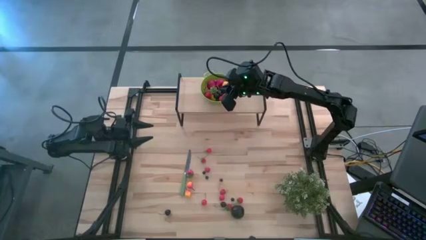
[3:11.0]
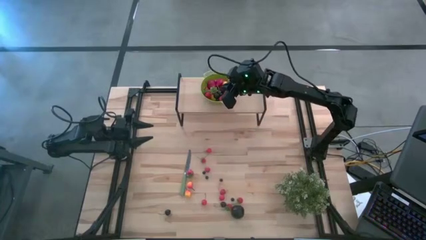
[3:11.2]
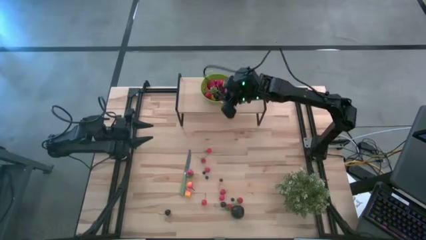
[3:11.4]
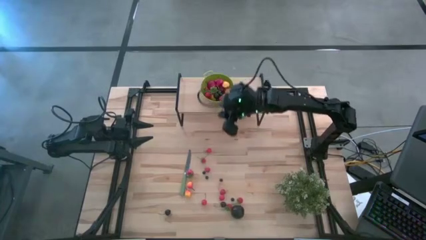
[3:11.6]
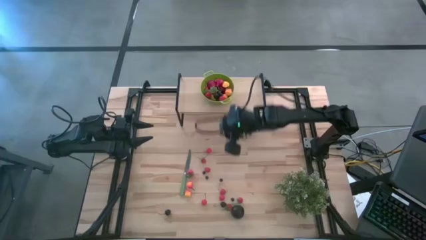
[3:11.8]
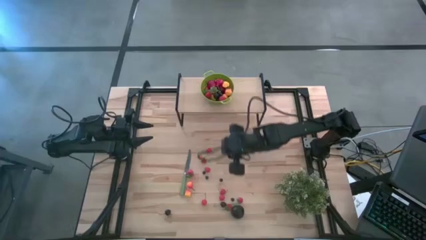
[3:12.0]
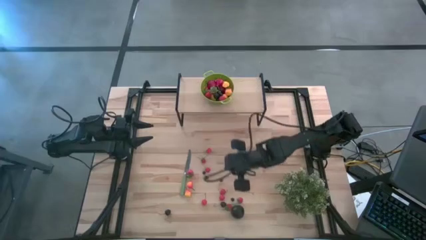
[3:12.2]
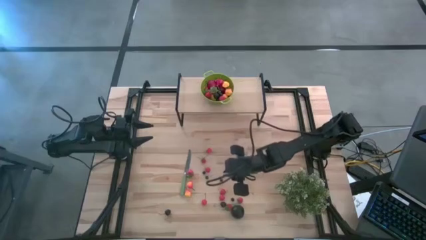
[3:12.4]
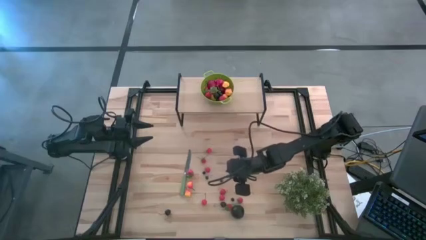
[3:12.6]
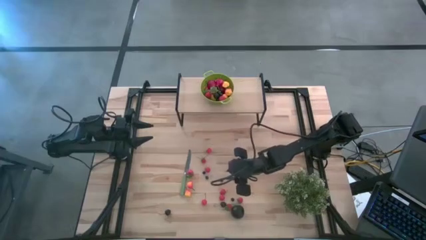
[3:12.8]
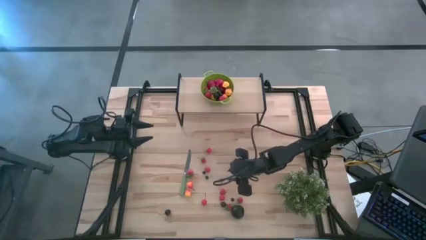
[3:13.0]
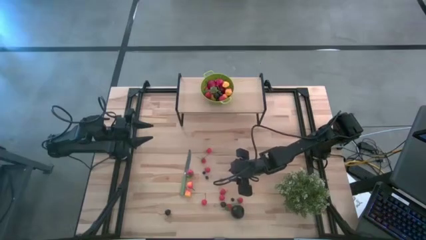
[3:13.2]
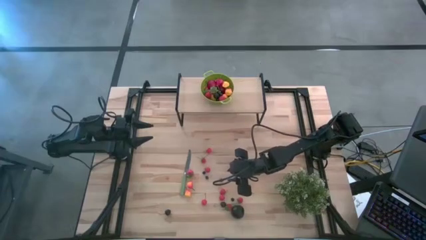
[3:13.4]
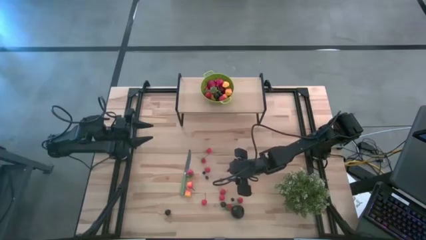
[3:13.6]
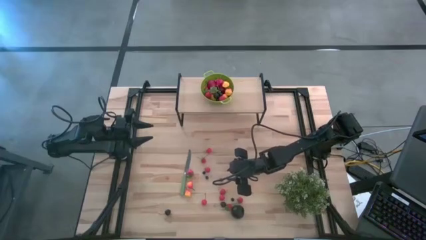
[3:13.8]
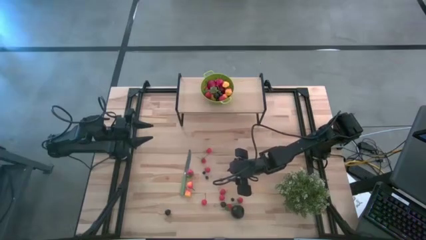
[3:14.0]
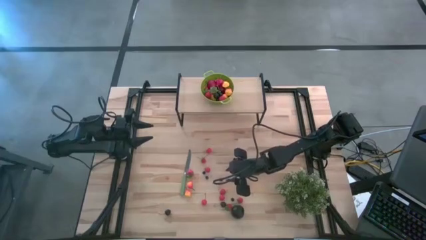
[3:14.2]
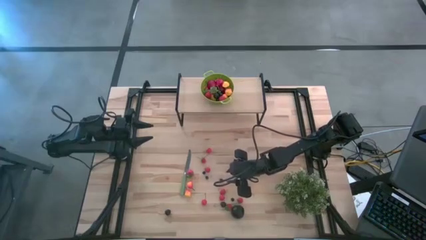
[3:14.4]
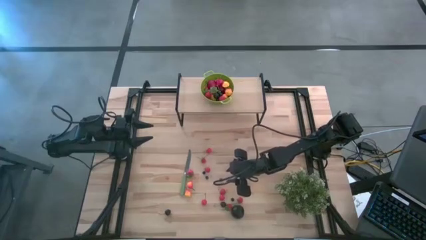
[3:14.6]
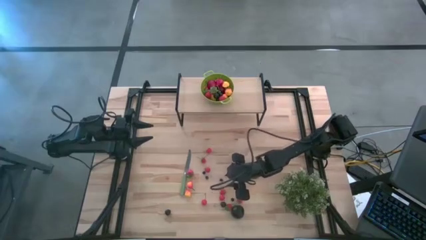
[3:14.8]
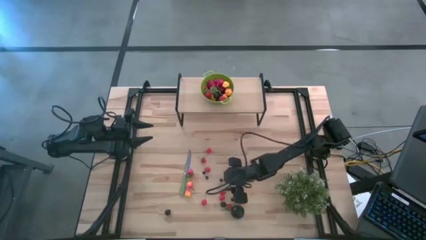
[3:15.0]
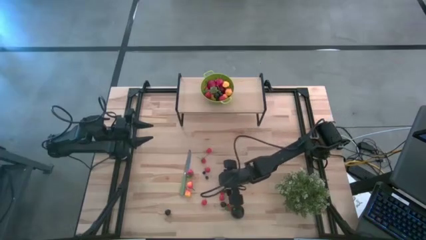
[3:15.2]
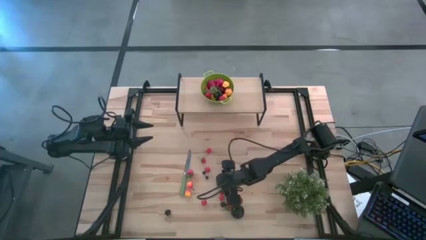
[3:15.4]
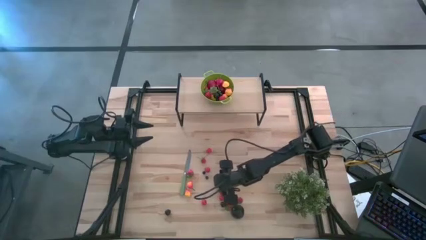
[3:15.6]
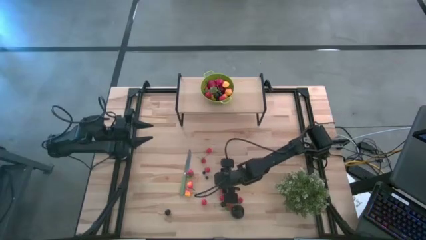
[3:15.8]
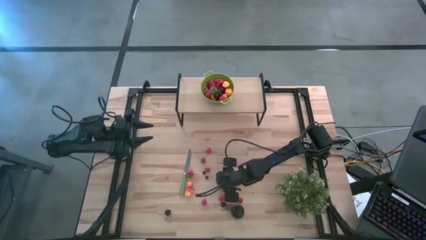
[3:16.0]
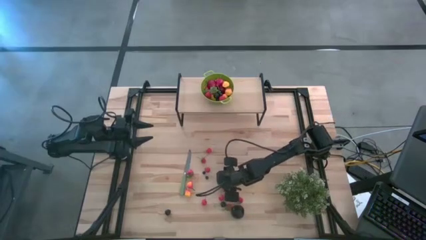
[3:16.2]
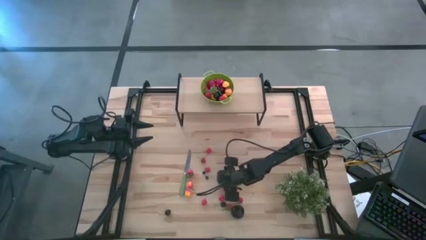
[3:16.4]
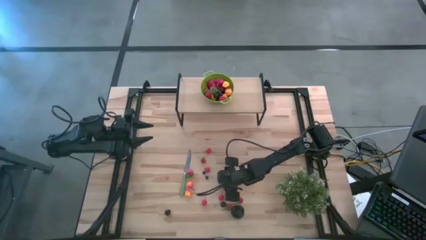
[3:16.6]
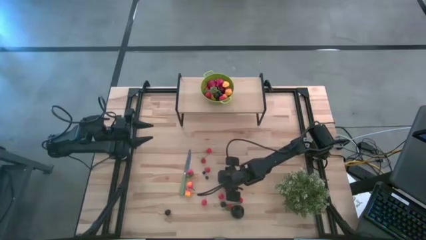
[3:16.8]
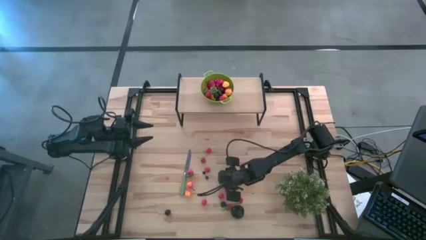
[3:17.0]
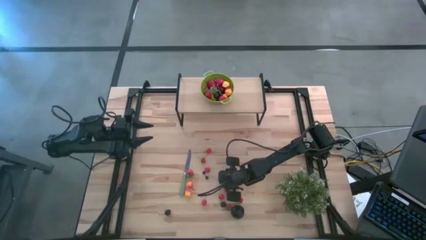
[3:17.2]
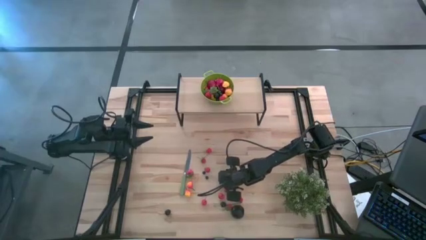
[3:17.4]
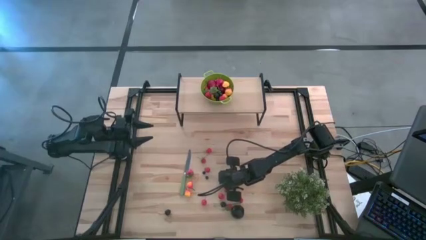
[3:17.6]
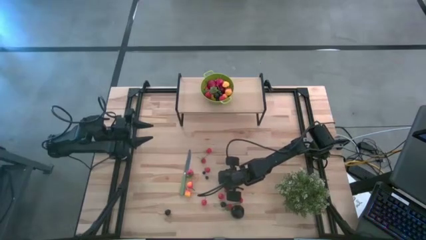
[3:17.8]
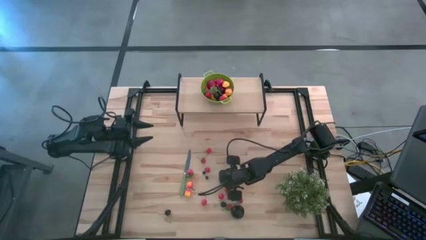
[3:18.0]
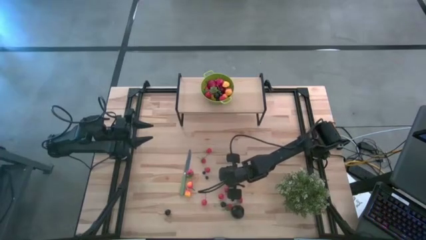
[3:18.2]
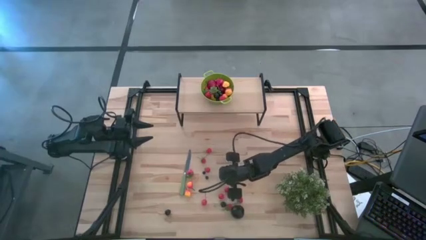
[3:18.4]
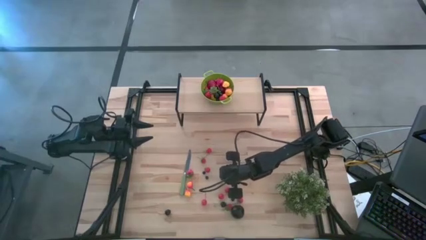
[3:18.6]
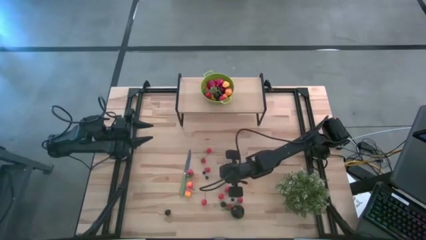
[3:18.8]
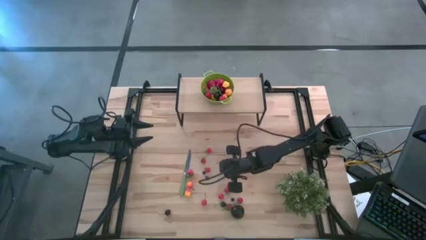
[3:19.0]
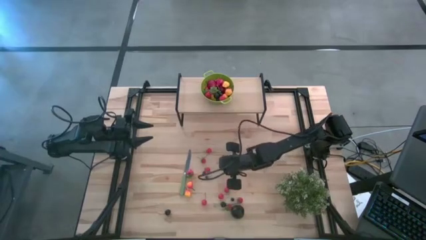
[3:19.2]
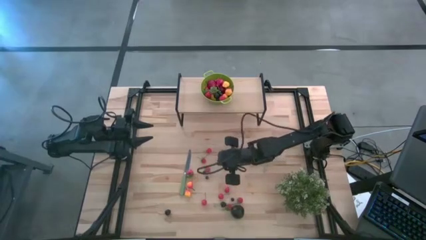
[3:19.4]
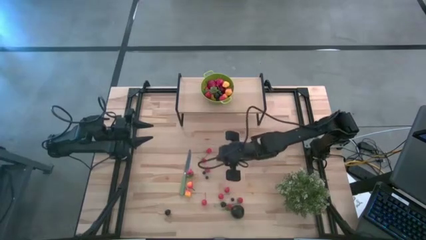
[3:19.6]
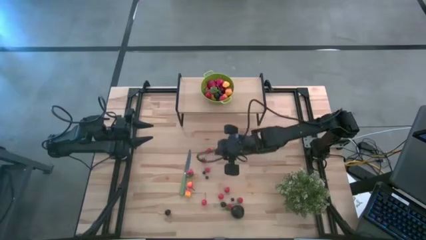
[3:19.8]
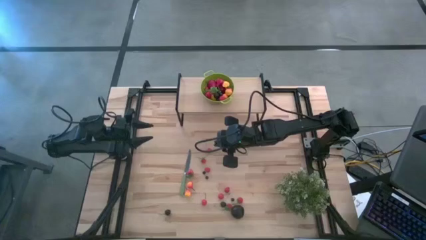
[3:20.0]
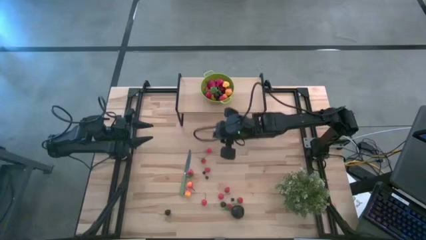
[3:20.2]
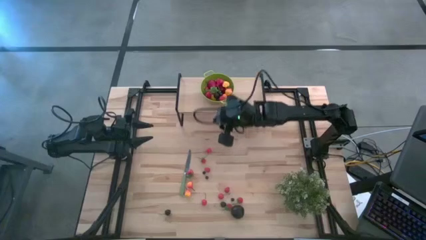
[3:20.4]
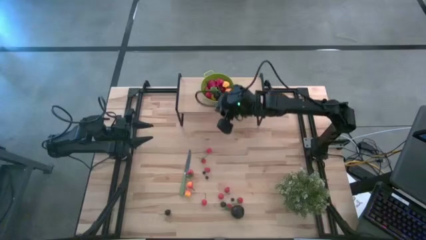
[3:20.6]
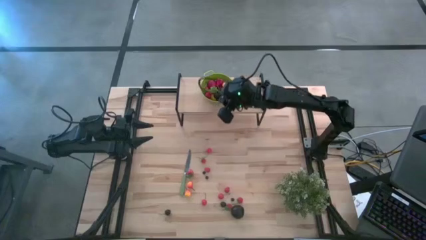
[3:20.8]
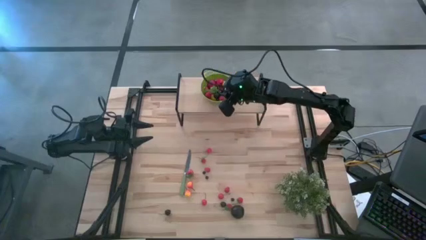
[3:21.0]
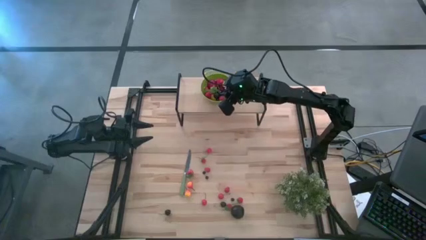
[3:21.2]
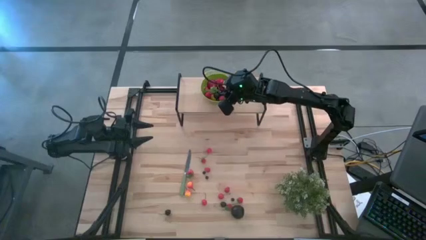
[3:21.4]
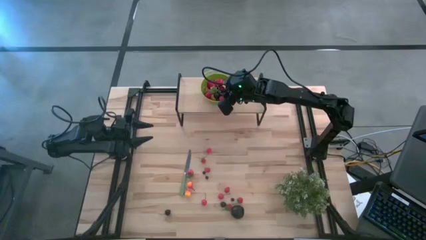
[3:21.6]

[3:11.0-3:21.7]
Task: Pick & Place Fruit
Put the blueberry into the green colander on the shelf

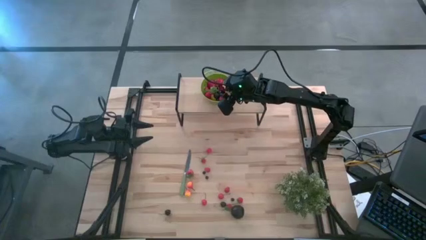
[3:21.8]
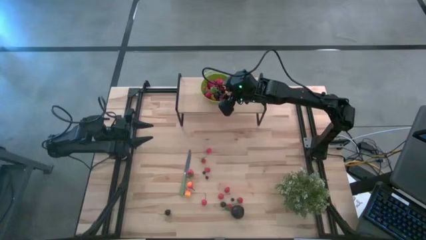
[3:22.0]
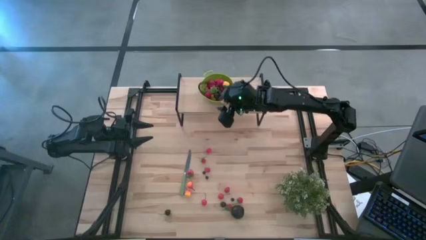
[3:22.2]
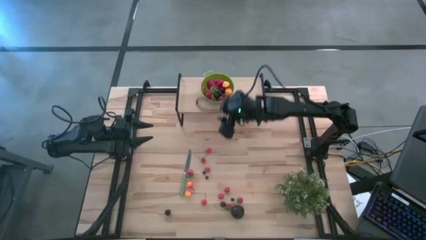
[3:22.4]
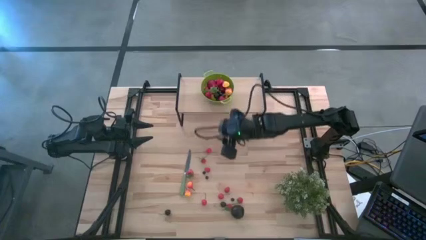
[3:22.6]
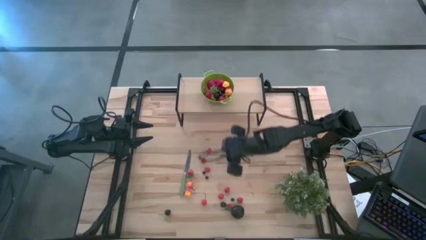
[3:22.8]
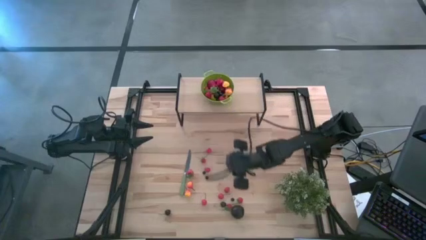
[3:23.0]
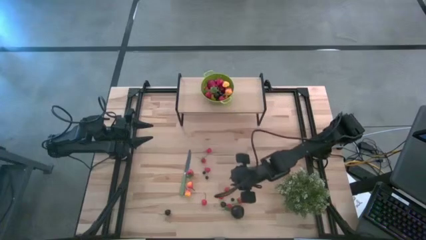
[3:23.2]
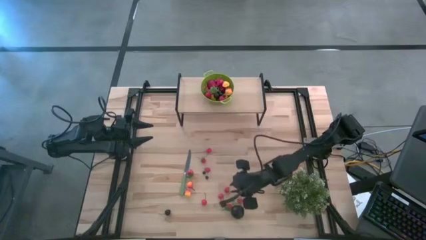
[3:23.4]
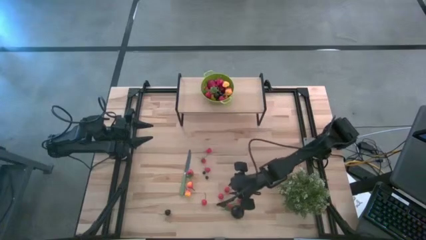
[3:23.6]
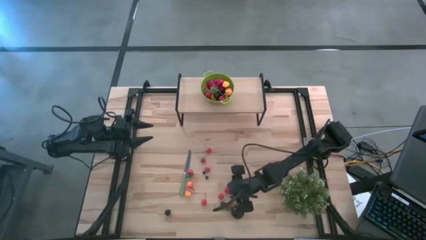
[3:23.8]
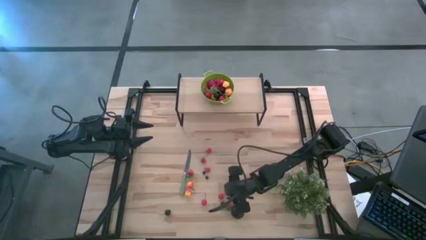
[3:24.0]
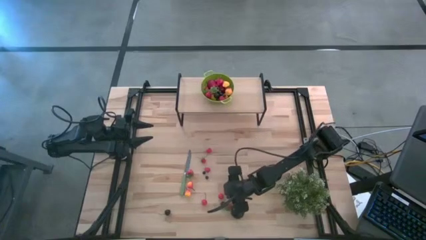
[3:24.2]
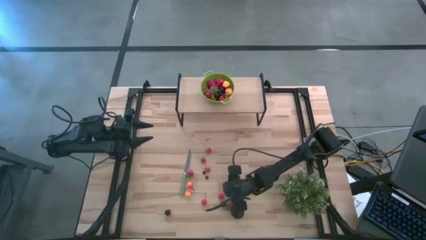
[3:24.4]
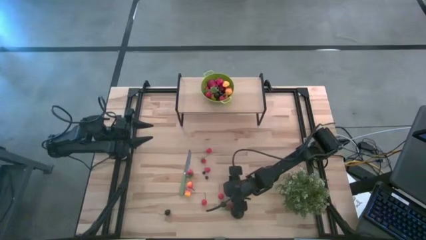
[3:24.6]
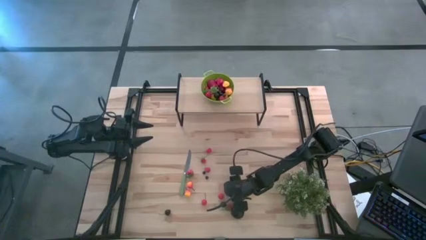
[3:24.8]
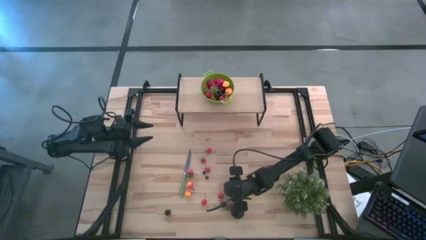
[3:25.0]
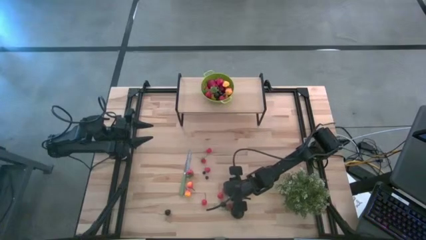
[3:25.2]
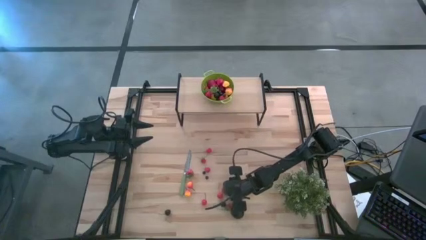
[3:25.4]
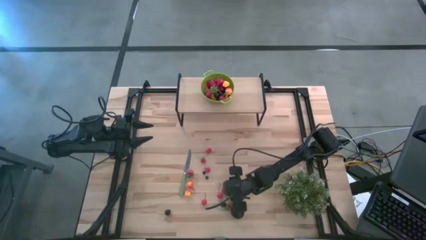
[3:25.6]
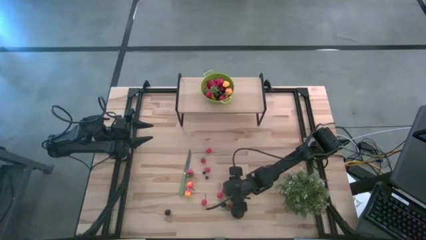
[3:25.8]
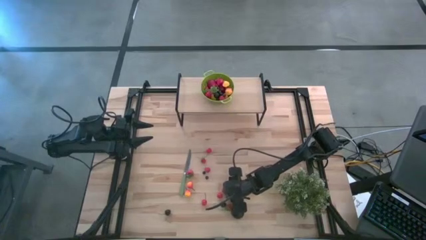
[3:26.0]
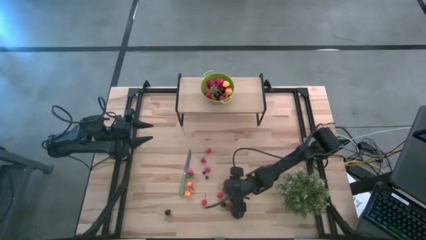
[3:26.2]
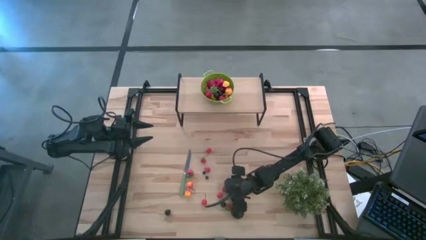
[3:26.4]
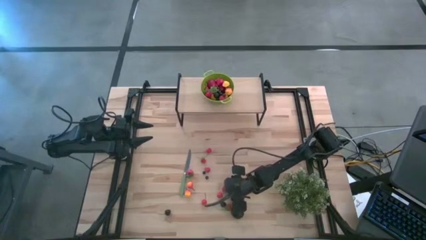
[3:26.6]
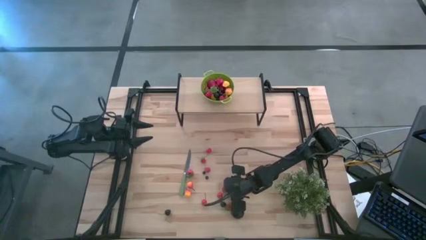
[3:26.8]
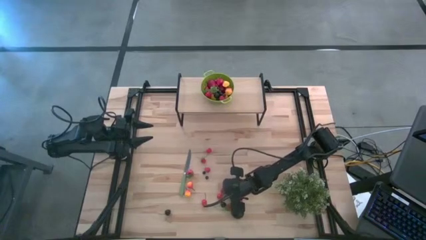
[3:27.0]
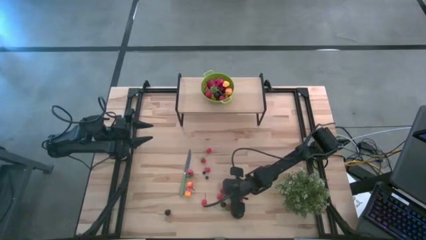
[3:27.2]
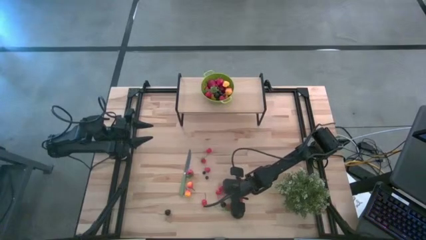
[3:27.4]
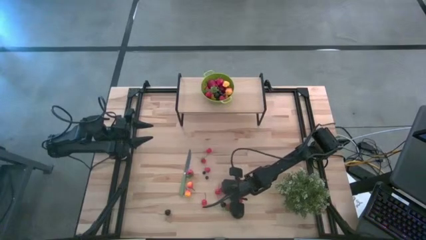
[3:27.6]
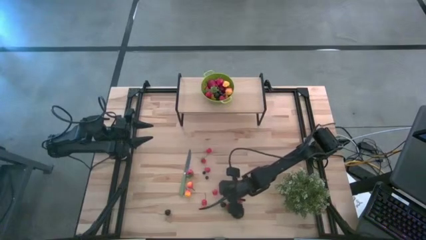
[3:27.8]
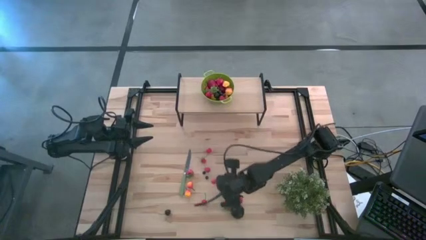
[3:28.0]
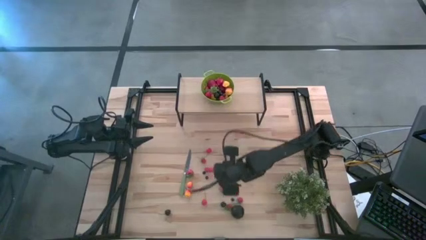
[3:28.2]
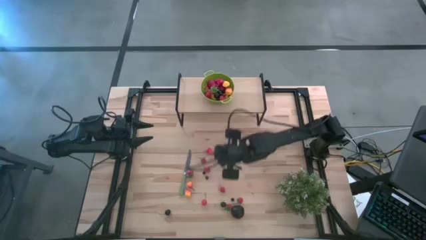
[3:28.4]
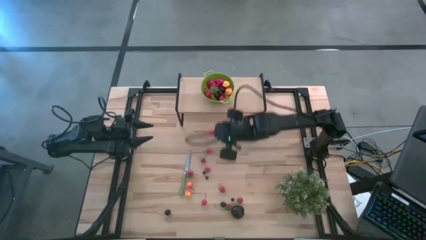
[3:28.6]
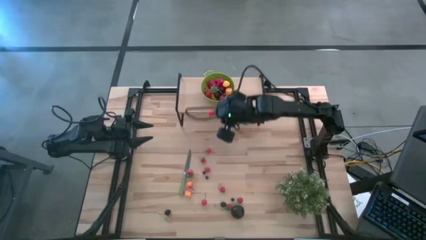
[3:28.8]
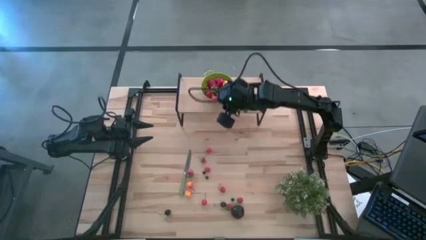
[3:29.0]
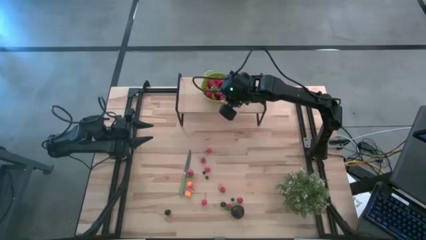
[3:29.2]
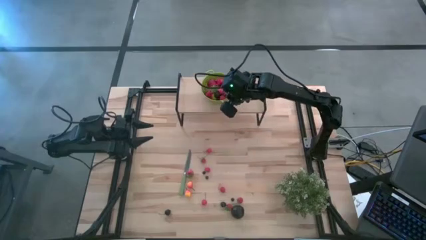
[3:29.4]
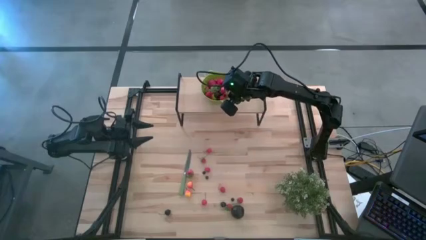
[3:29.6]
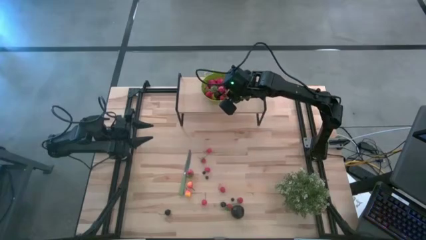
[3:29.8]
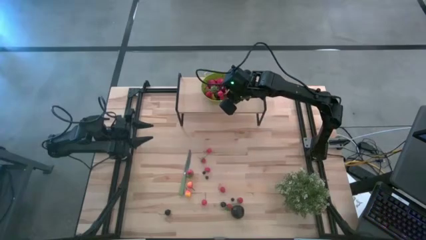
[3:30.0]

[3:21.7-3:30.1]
Put the red cherry into the green colander on the shelf
